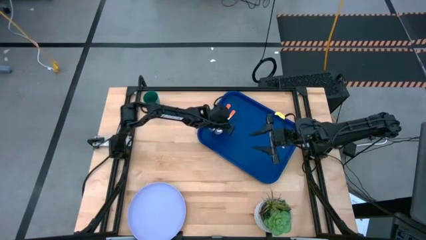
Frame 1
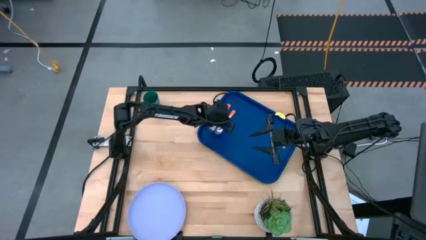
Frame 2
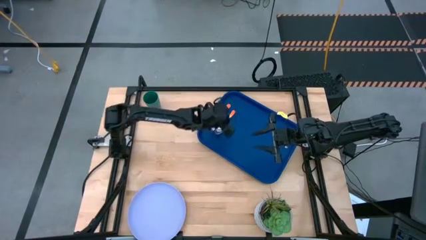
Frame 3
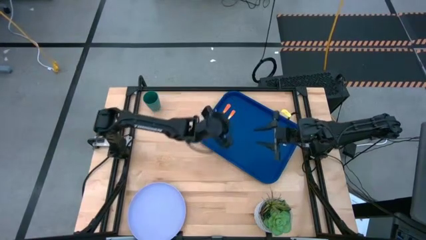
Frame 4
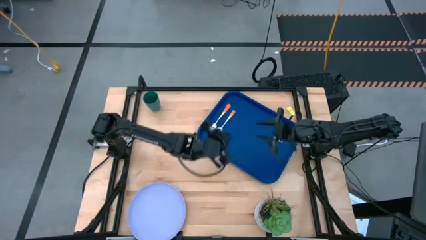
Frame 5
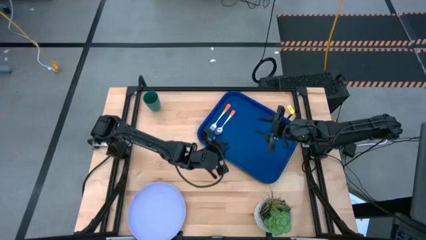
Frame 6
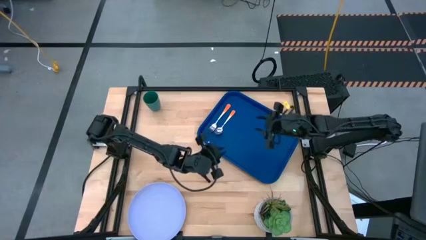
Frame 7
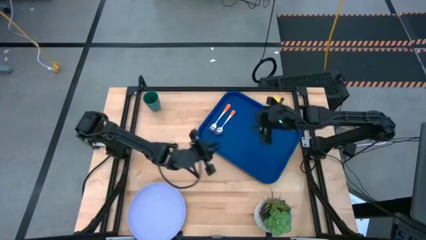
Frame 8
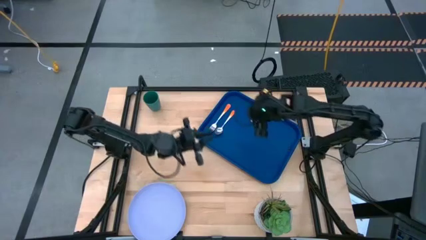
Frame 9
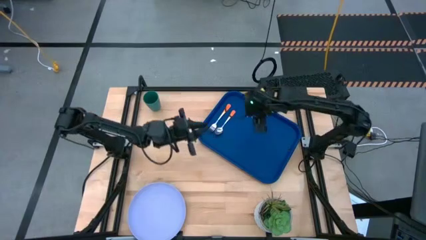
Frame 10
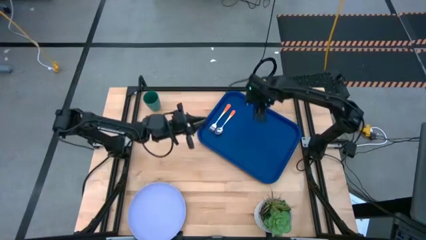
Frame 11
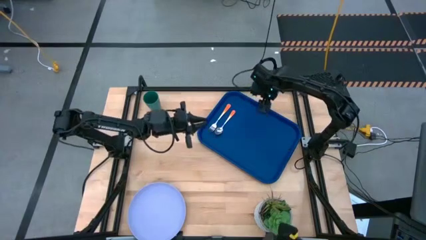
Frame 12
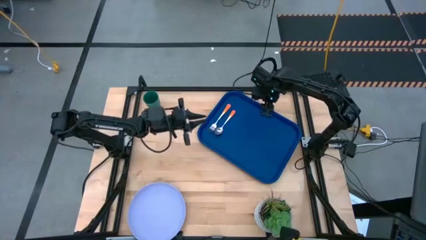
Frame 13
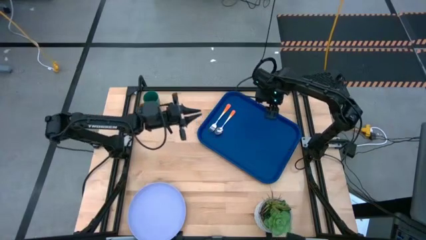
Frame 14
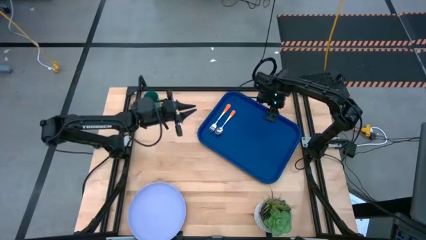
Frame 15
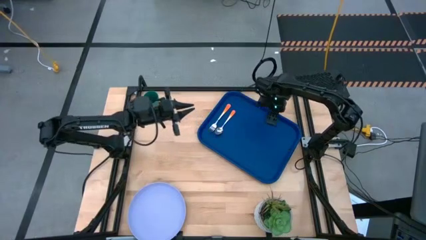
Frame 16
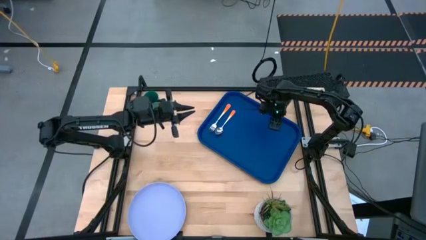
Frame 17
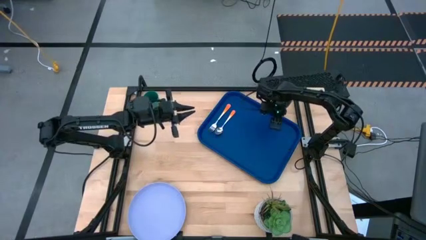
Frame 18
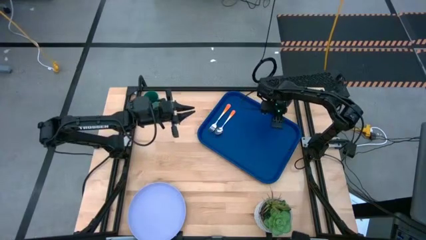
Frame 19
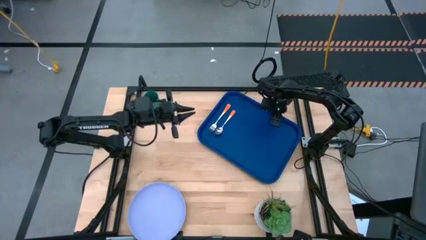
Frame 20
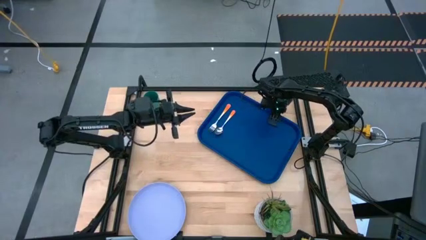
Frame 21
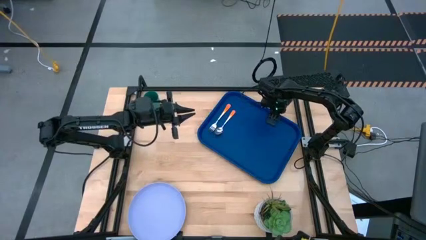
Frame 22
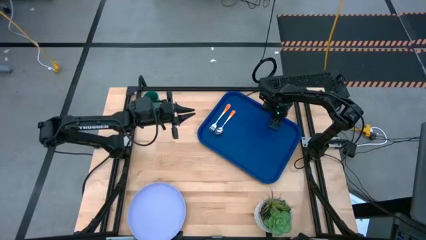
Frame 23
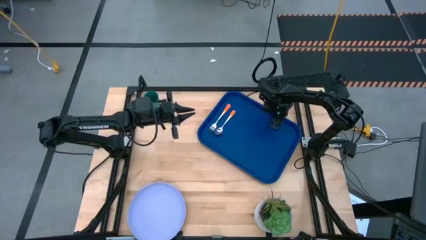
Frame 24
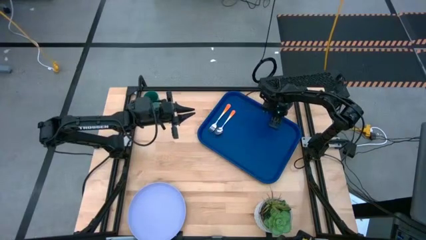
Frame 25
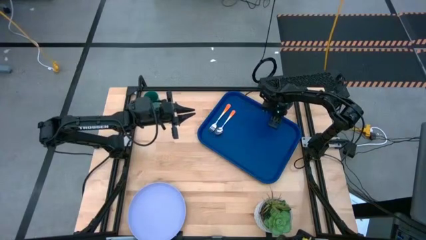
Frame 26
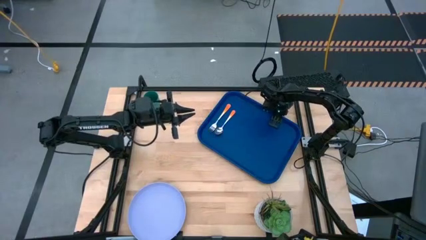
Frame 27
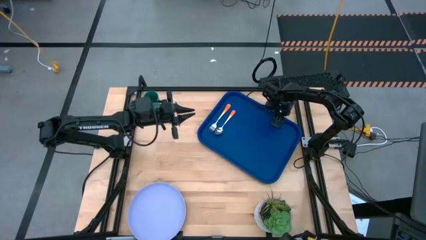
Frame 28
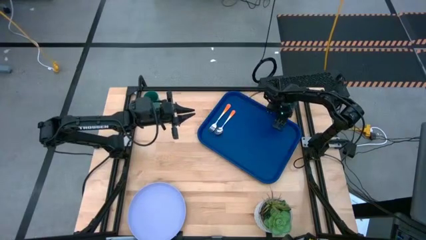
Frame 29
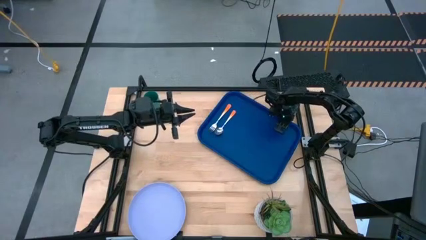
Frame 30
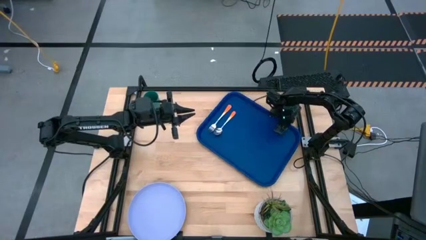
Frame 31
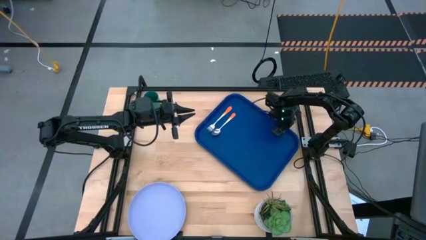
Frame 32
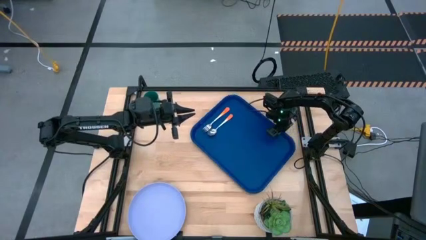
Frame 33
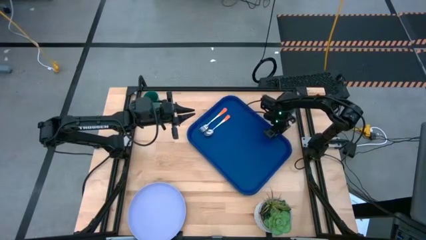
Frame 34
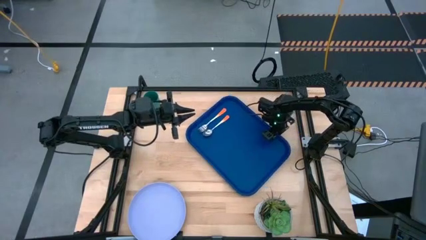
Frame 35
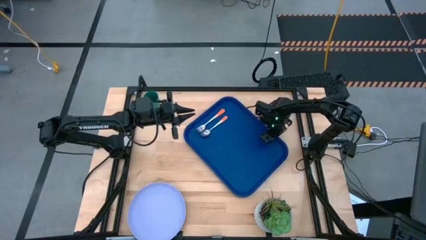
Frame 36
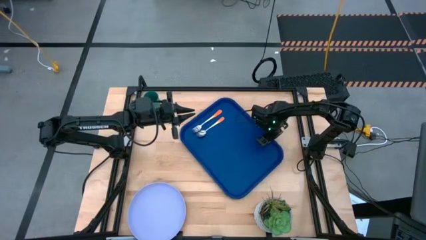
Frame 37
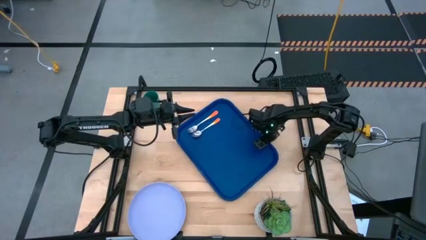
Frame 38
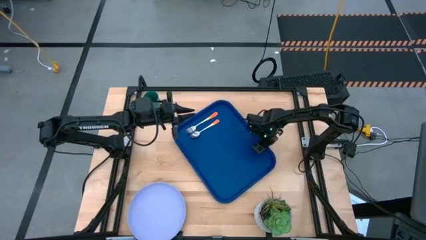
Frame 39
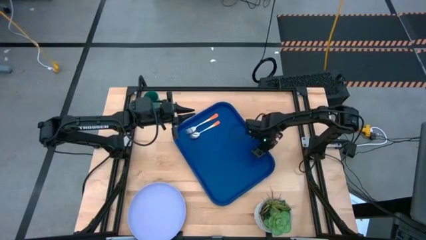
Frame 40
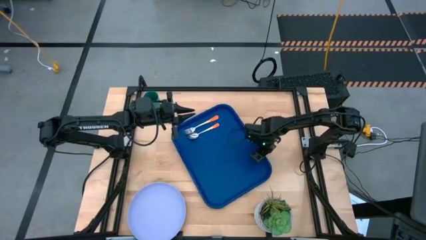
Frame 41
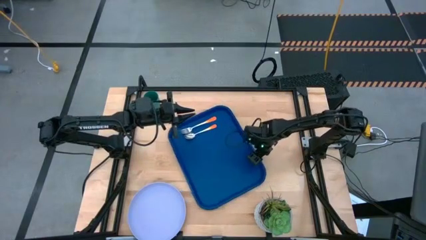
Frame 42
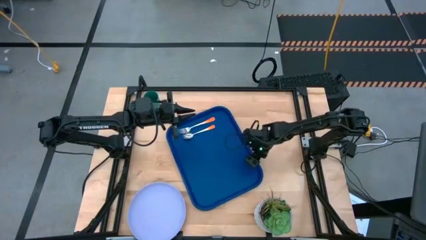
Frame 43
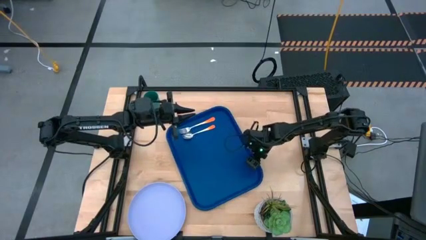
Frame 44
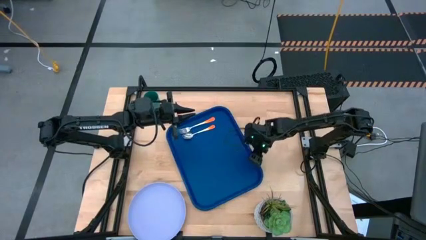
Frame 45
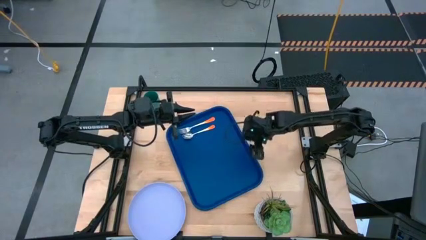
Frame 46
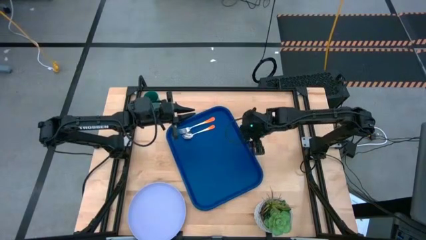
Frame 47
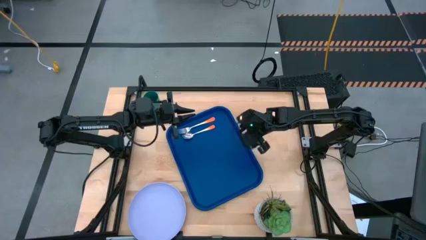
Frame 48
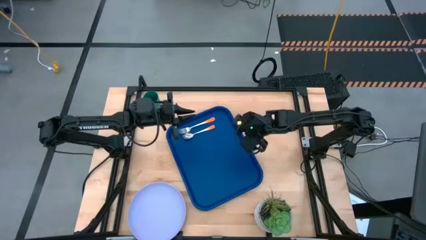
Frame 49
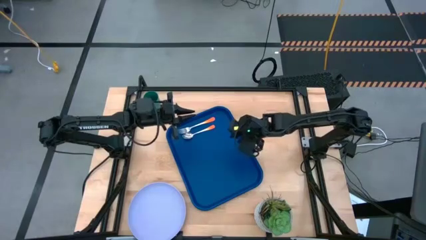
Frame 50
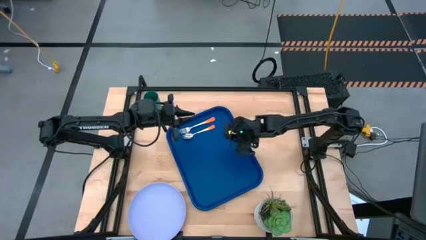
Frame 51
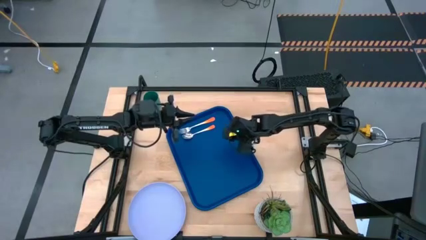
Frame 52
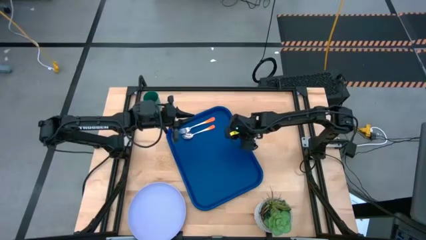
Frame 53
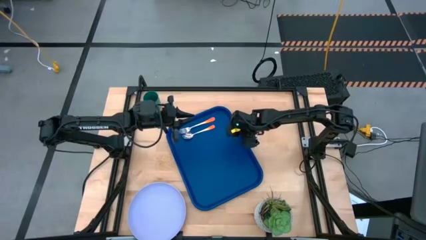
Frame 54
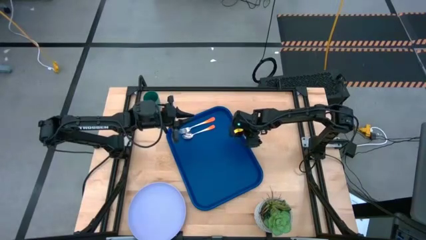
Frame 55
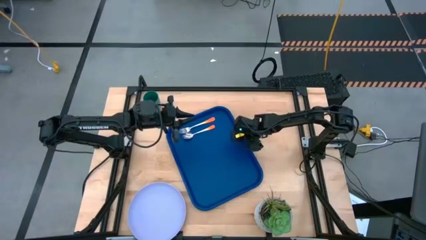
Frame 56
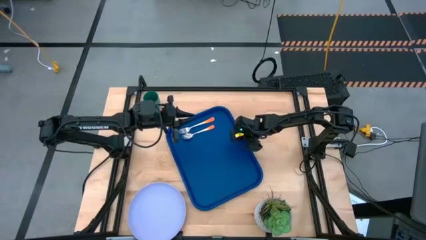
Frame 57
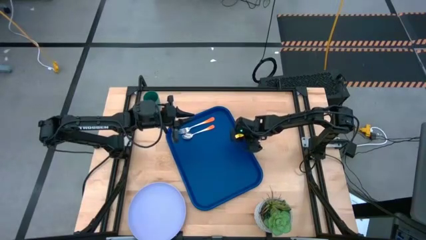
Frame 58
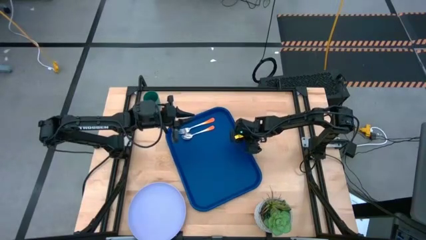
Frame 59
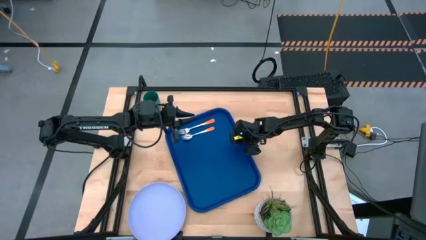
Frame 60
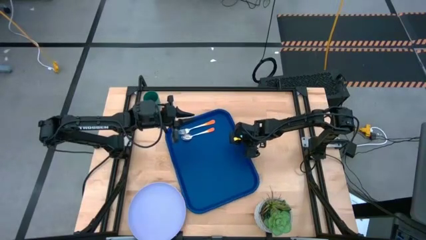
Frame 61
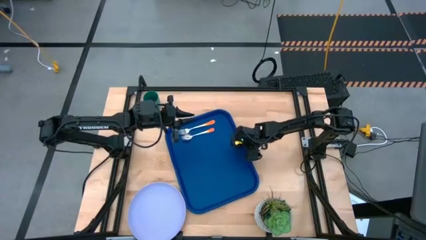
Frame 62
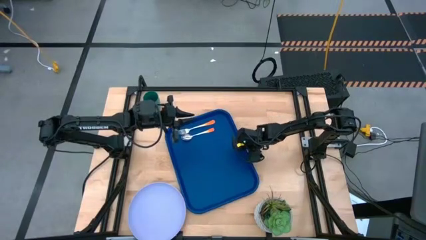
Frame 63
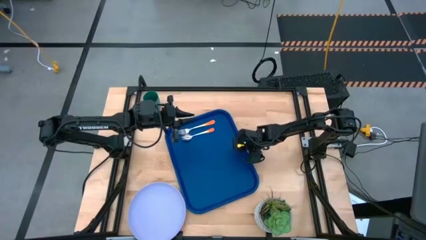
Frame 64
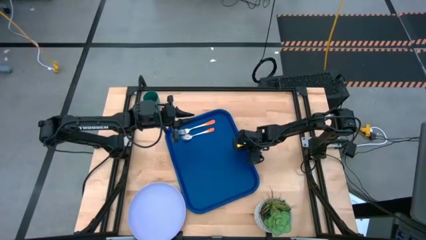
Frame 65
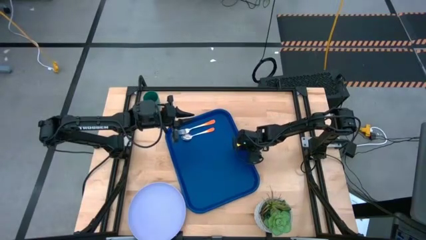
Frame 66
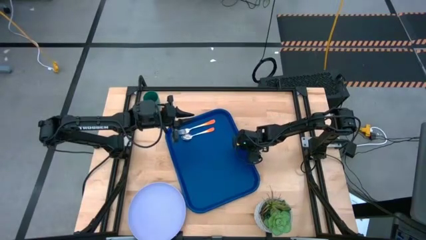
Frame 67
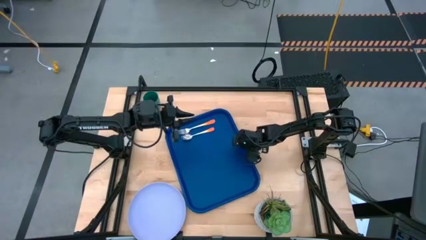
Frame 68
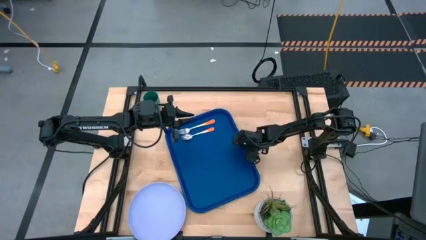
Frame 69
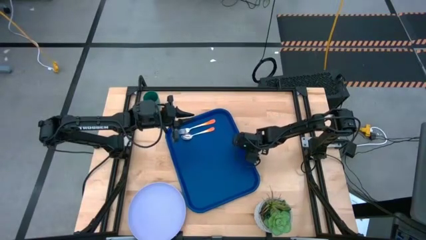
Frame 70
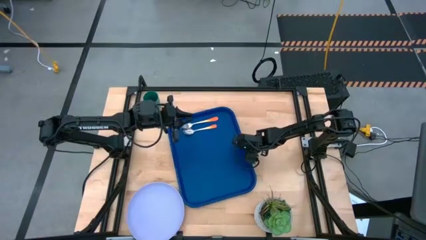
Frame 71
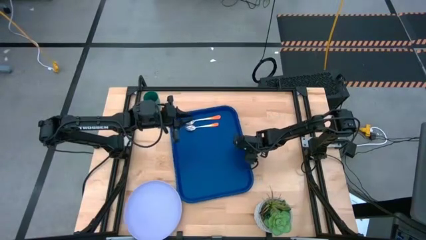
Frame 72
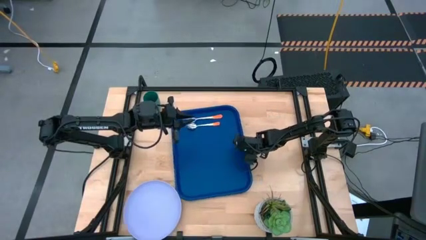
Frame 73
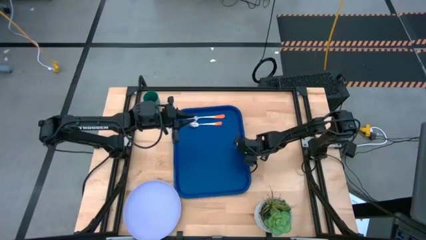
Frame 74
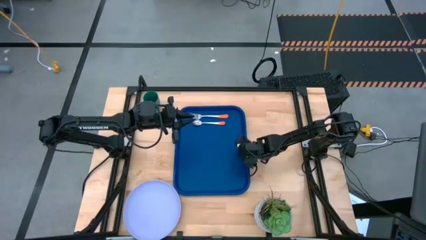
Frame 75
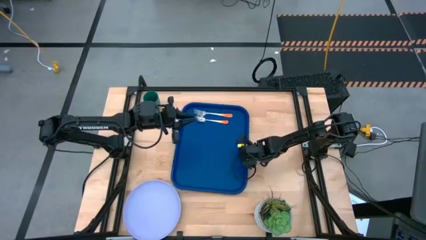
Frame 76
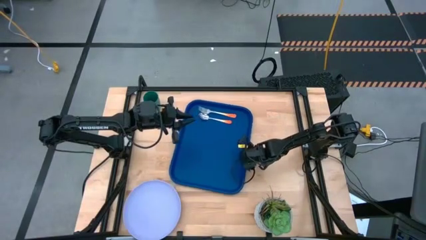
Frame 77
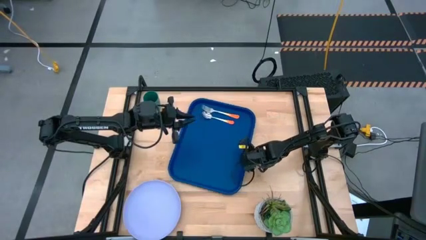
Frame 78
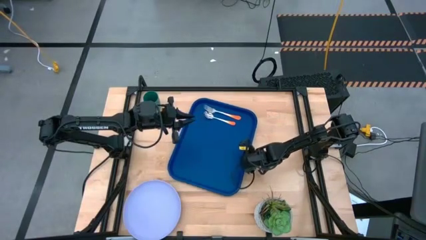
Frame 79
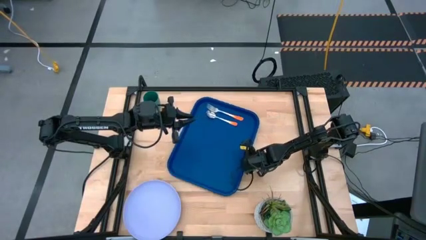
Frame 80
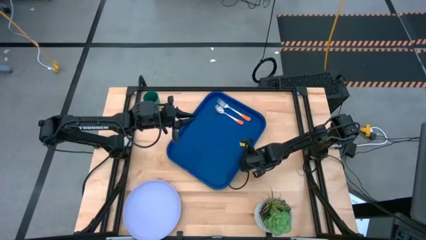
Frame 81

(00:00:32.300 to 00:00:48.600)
Task: Pick and place plate/cup/fork/spoon on tray
Adjust the blue serving tray
